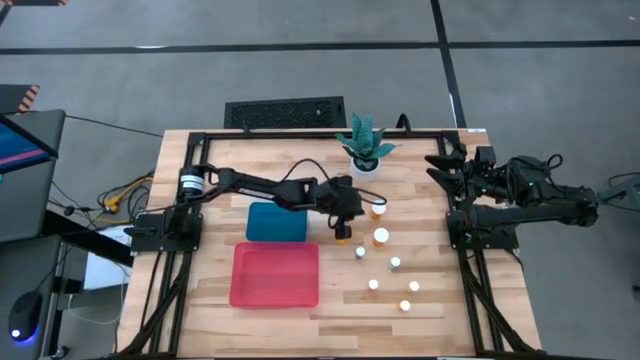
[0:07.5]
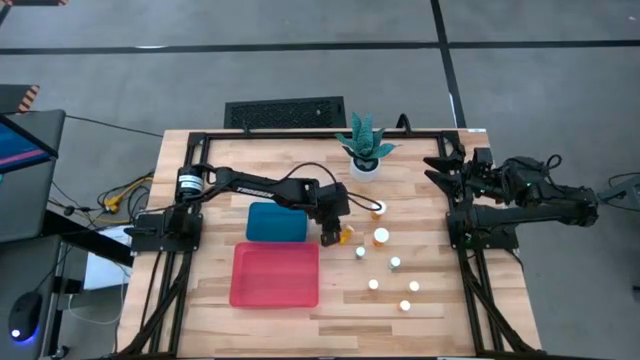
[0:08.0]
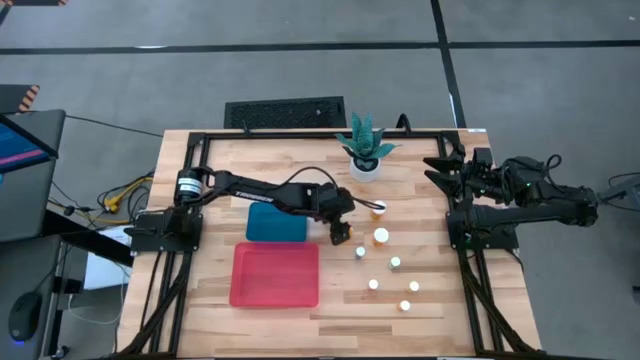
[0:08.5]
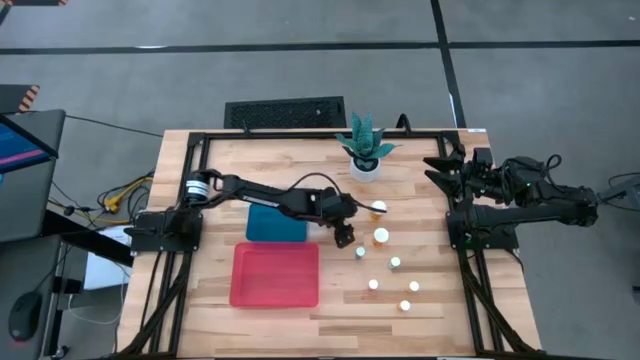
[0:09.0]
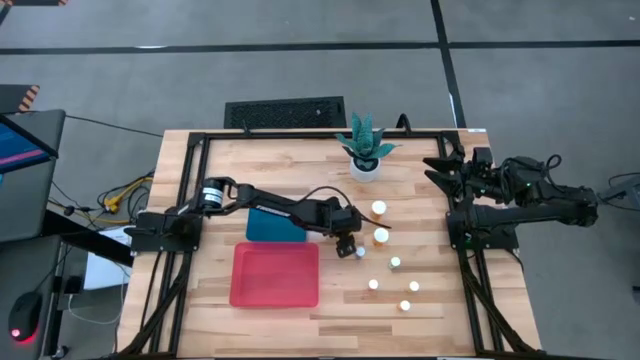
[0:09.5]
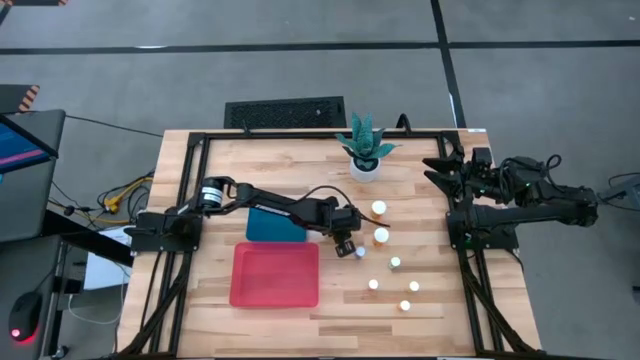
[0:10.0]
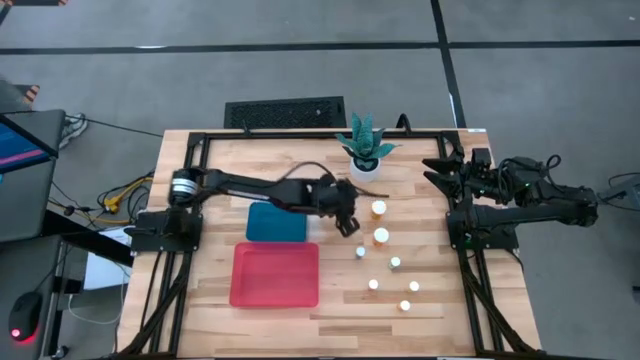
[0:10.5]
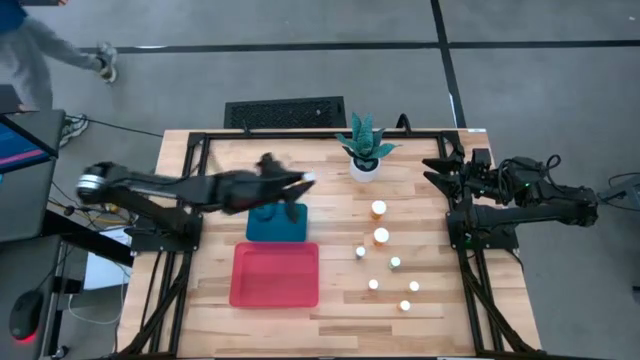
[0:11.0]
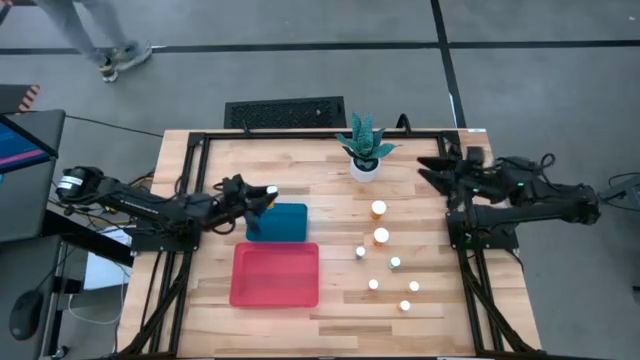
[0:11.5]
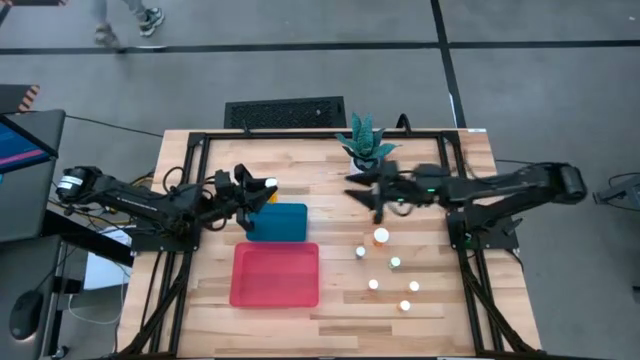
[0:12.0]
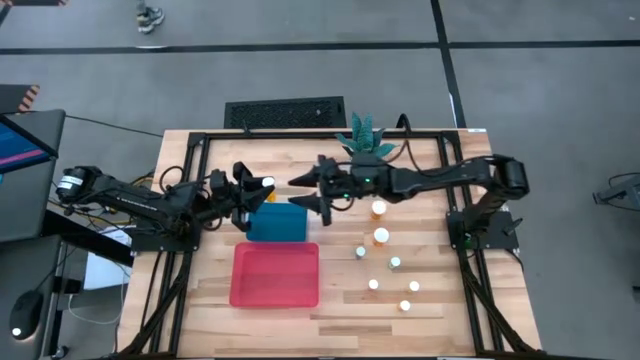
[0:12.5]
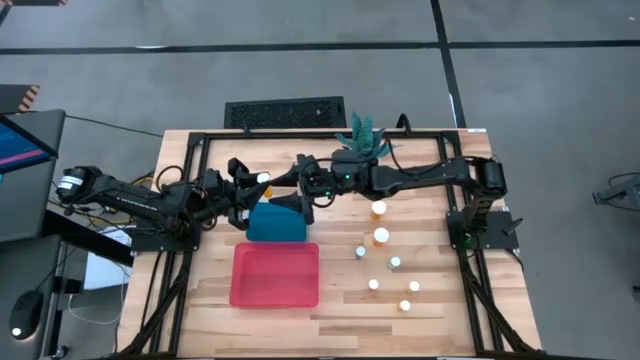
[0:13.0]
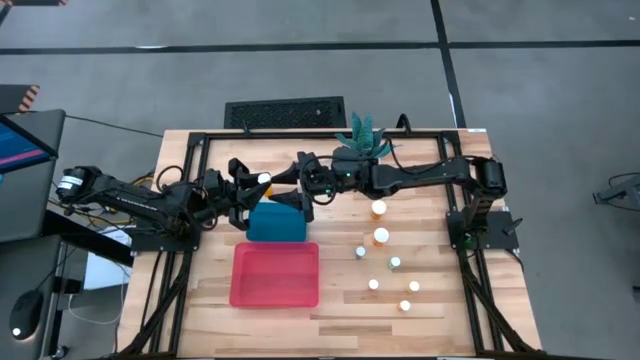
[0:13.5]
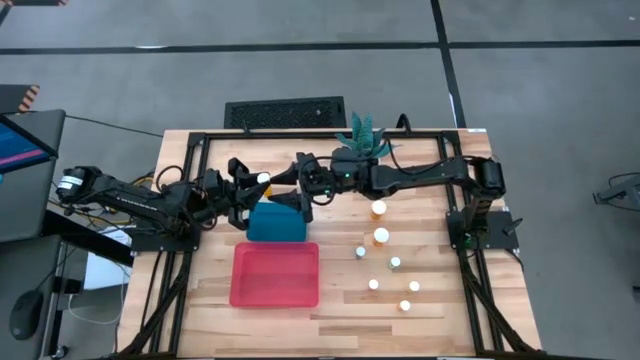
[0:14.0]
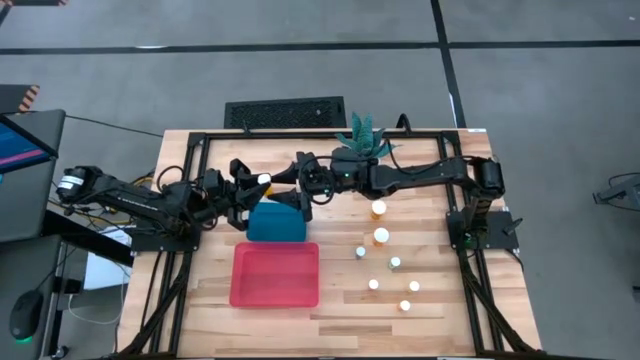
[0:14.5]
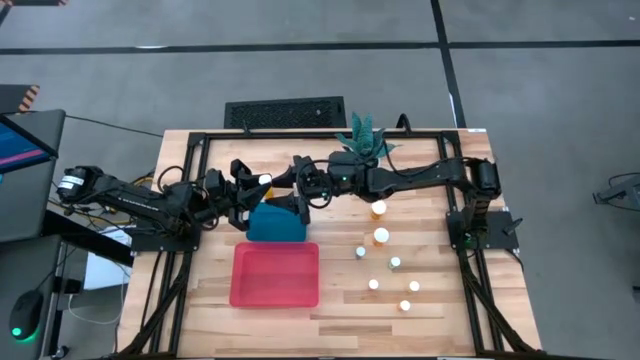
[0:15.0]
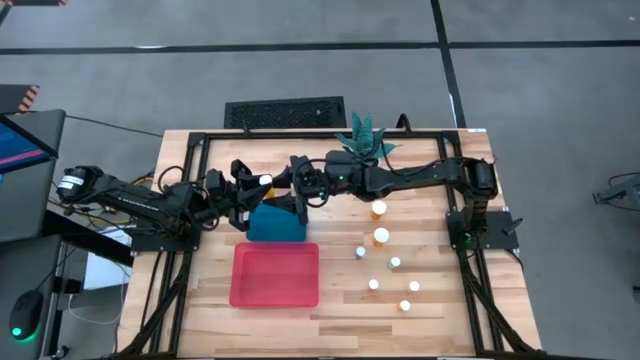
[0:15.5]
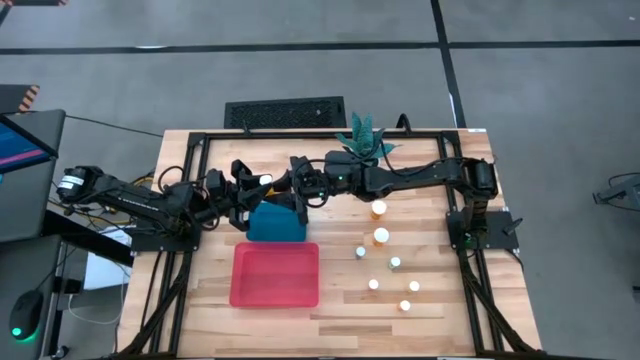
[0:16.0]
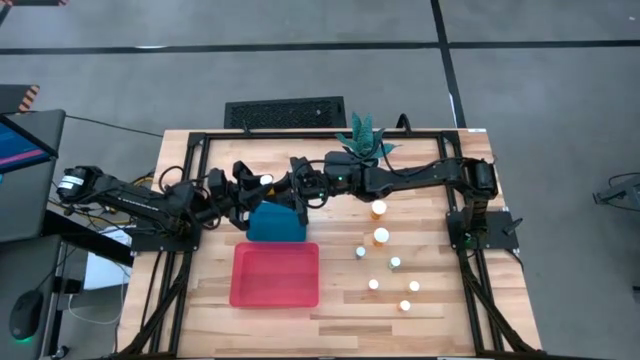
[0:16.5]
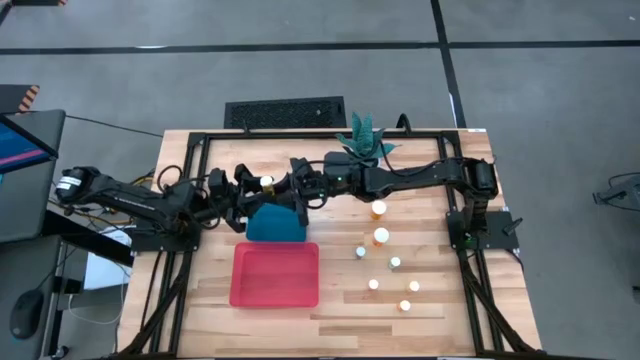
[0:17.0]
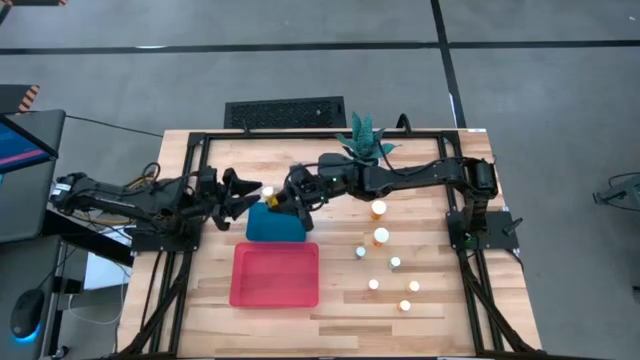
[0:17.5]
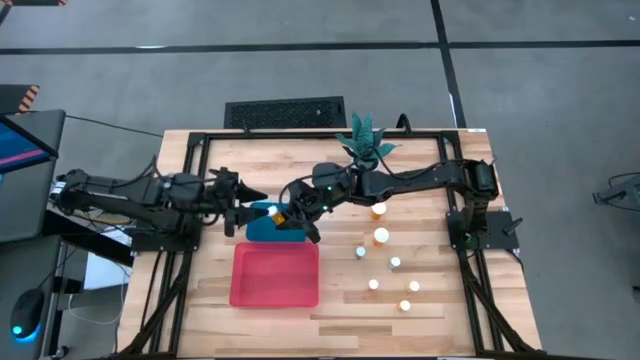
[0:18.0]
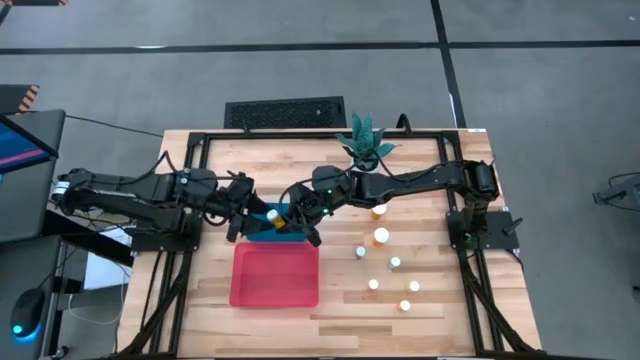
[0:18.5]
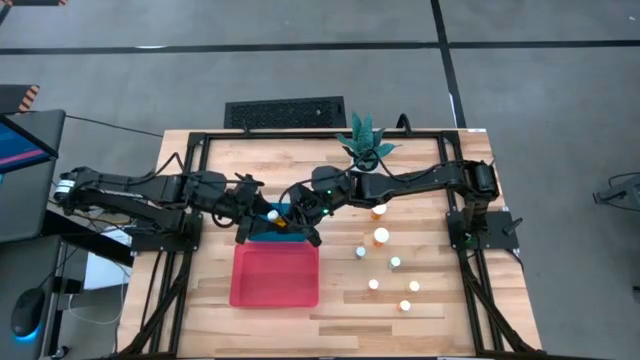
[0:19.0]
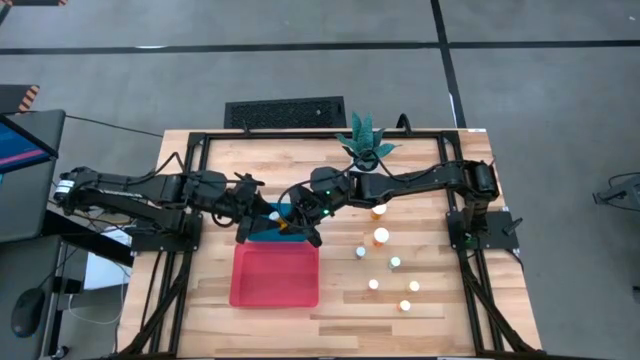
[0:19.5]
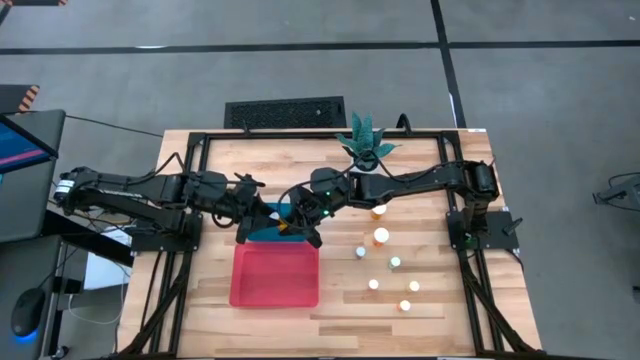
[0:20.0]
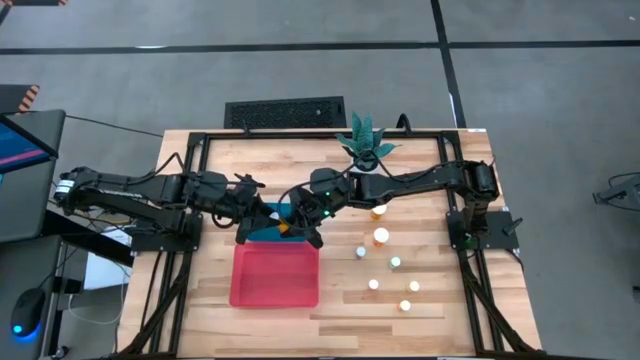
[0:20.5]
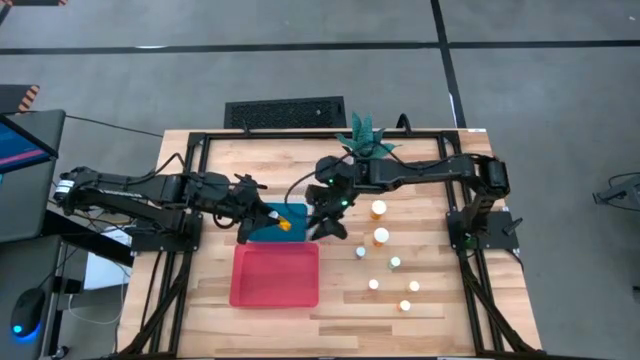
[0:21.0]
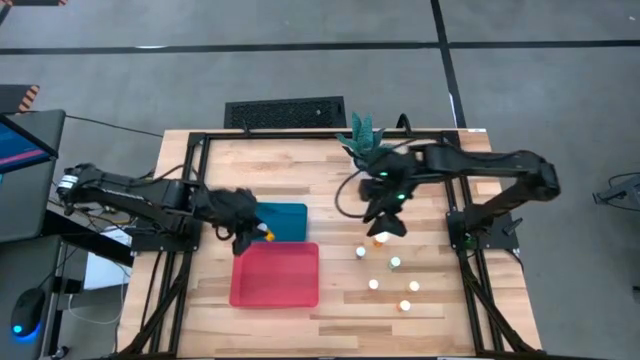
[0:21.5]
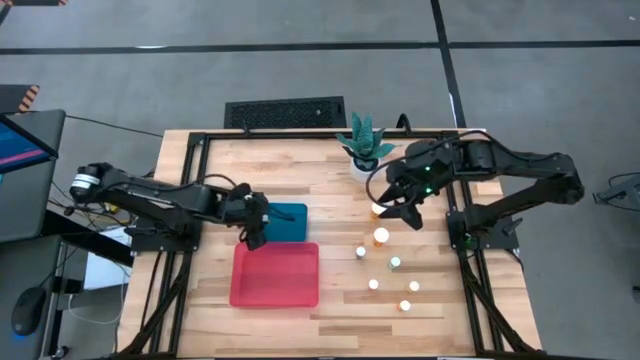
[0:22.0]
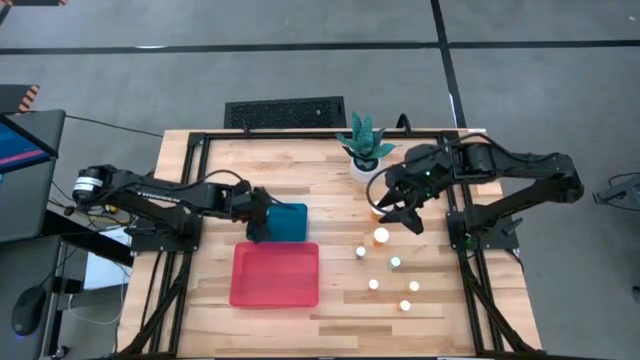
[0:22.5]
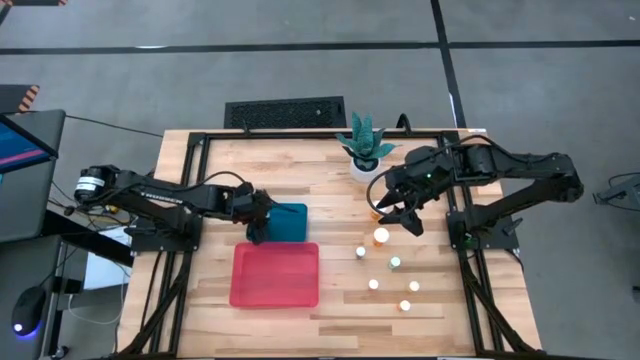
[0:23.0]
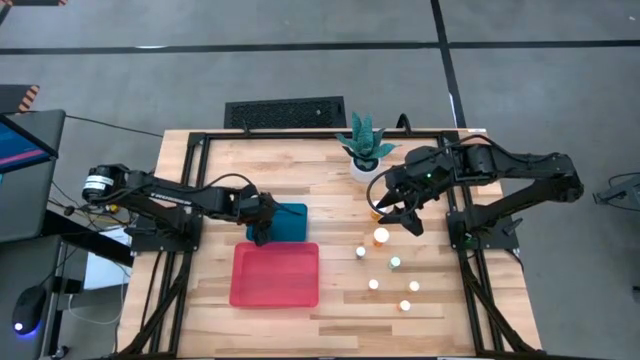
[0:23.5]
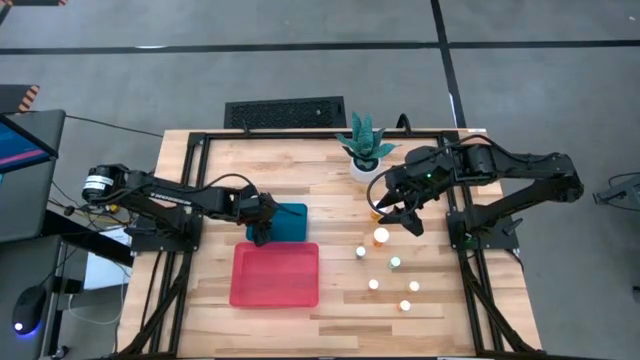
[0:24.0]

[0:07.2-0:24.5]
Task: Pick and place medicine bottles into bin by pill shape (circle, oval)
Put the orange tablet bottle into the blue bin

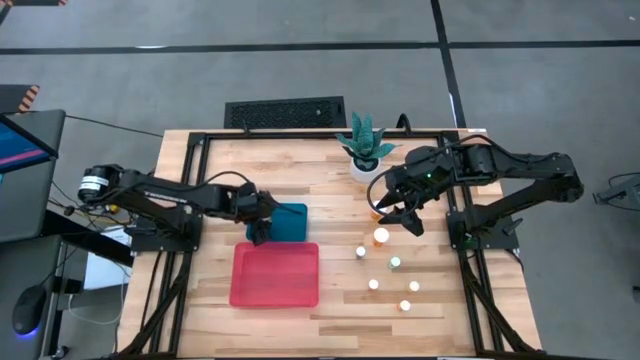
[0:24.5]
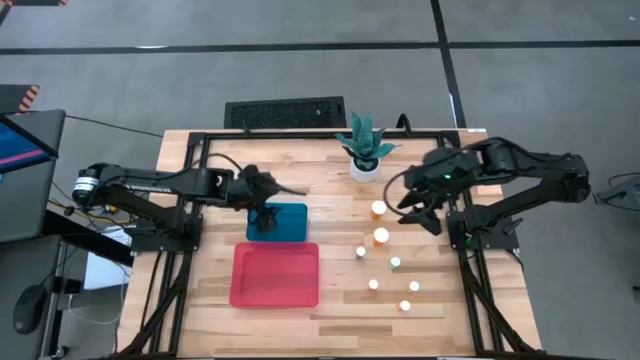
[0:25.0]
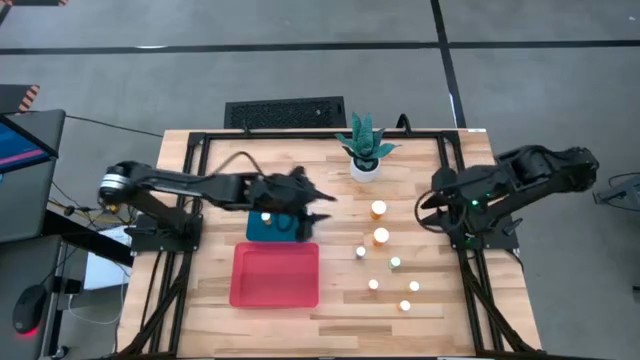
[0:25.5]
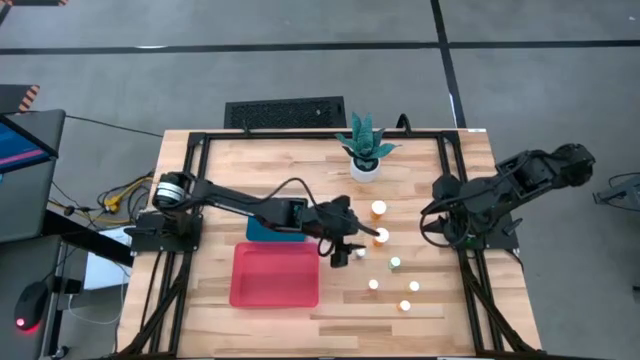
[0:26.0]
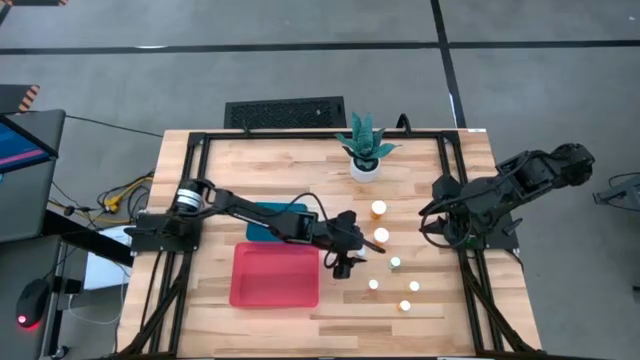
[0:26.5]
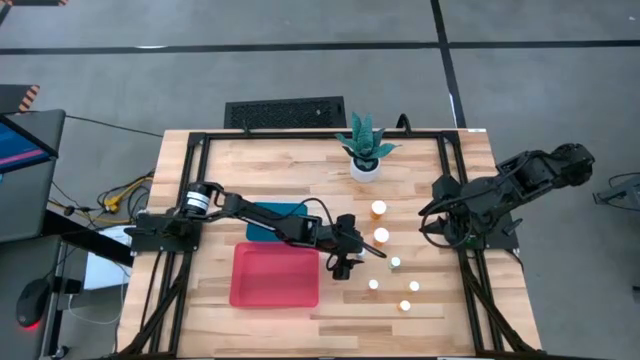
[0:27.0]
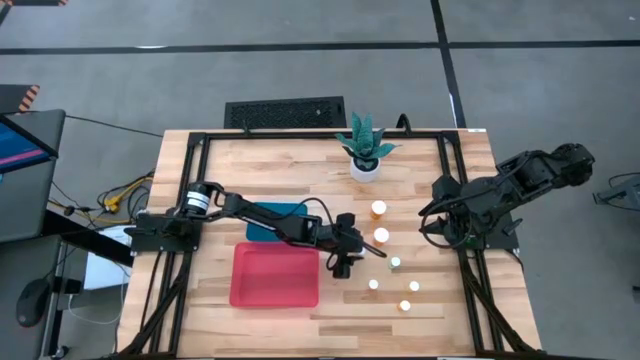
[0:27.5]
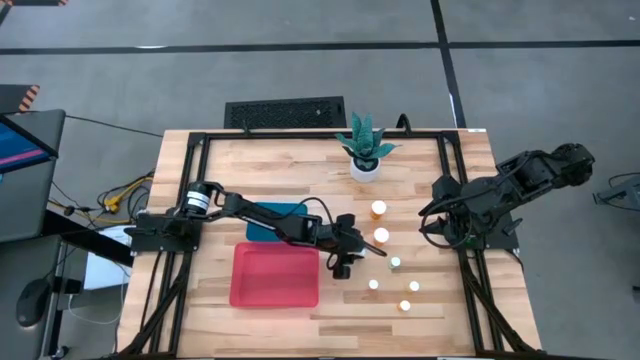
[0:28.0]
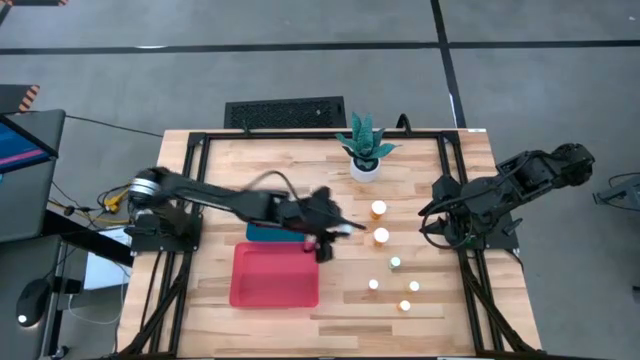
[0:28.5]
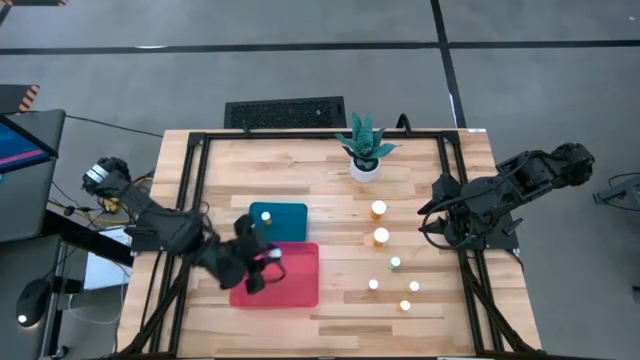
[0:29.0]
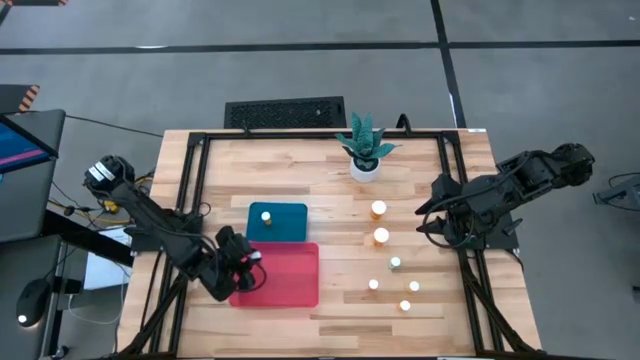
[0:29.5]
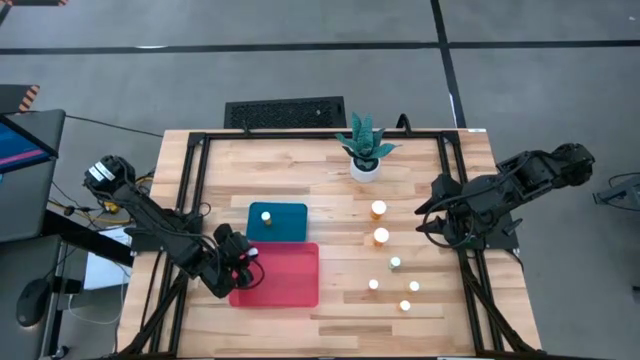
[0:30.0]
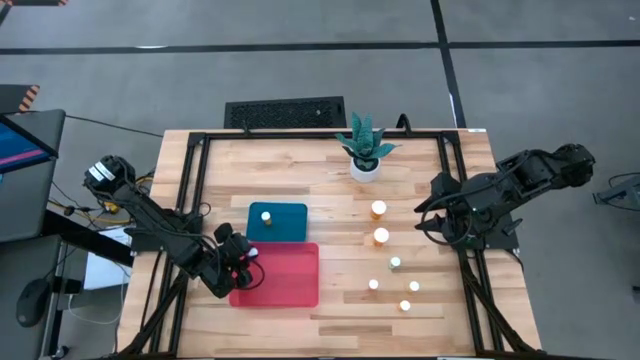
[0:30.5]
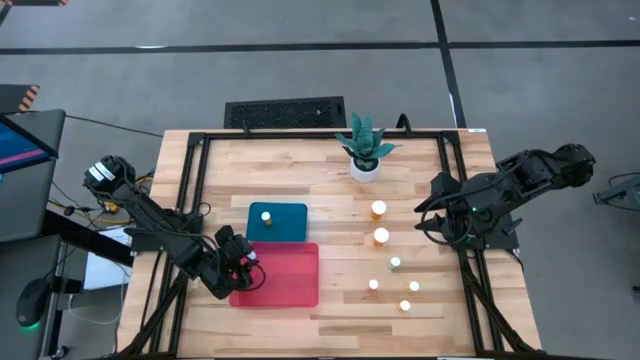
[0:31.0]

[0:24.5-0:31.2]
Put the blue capsule bottle into the red bin
